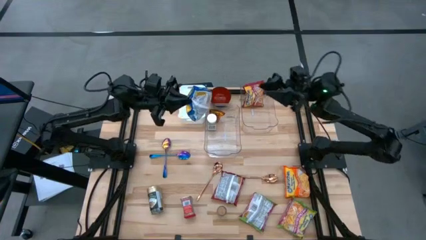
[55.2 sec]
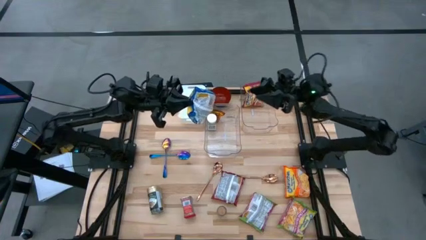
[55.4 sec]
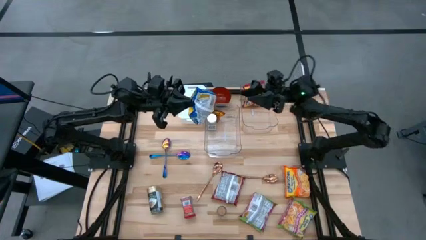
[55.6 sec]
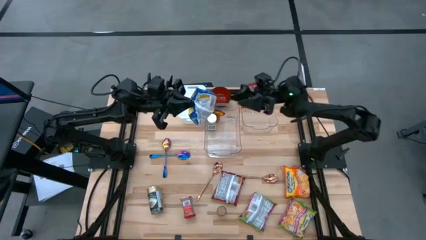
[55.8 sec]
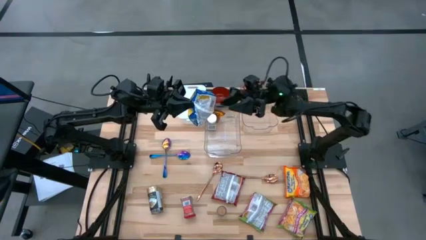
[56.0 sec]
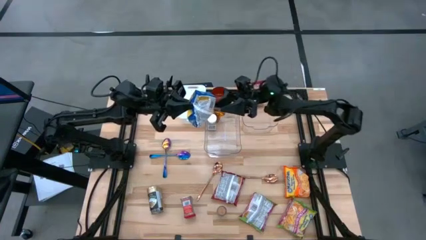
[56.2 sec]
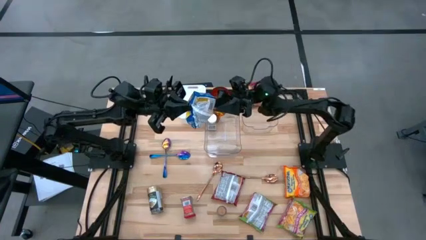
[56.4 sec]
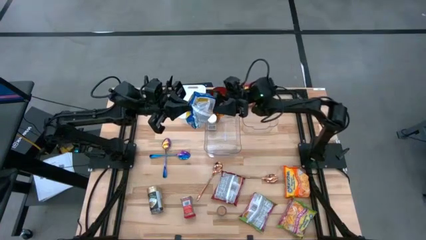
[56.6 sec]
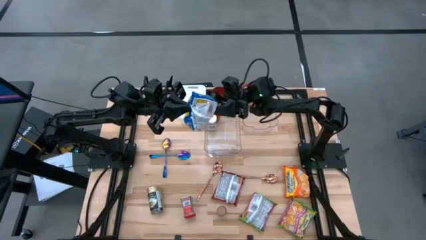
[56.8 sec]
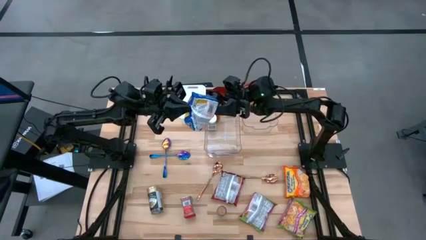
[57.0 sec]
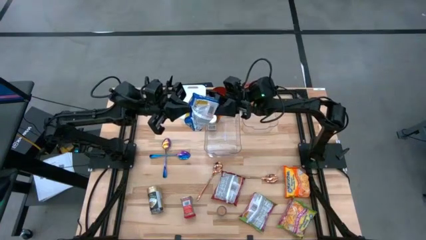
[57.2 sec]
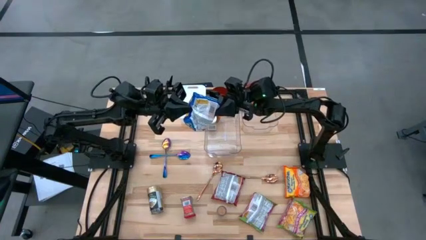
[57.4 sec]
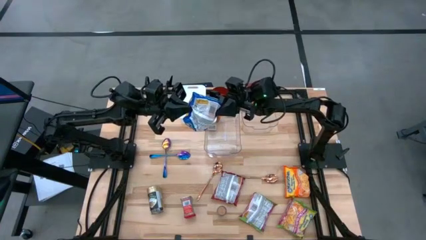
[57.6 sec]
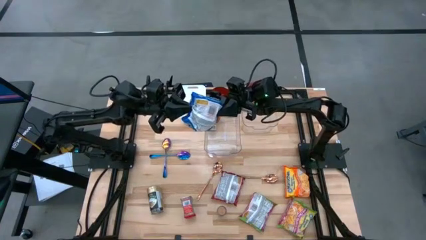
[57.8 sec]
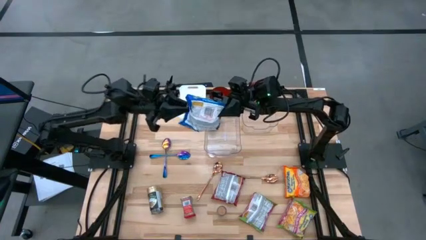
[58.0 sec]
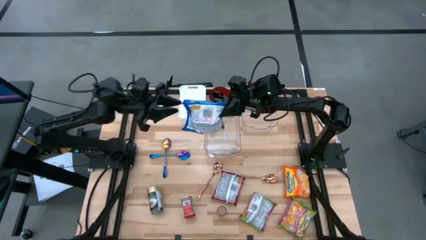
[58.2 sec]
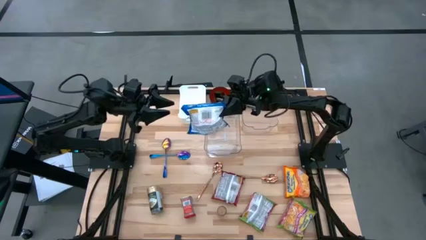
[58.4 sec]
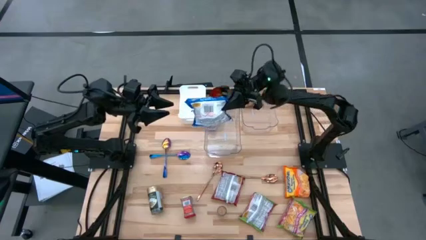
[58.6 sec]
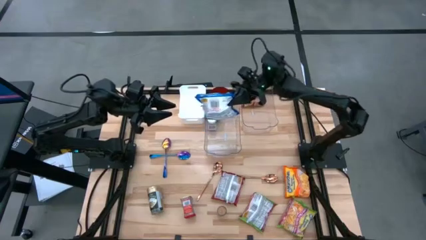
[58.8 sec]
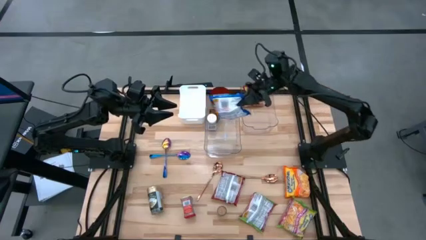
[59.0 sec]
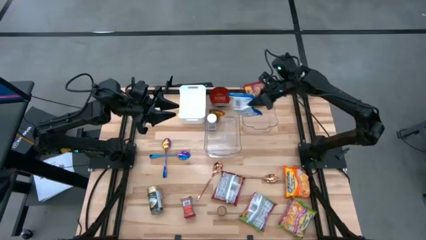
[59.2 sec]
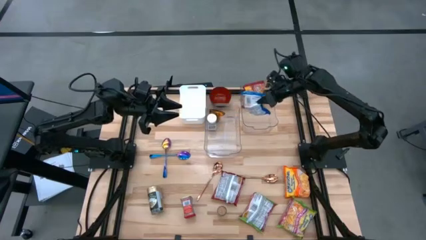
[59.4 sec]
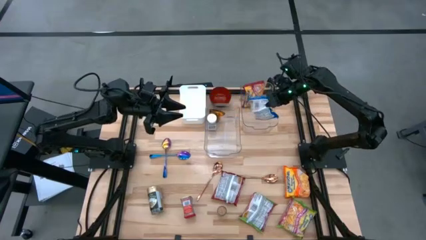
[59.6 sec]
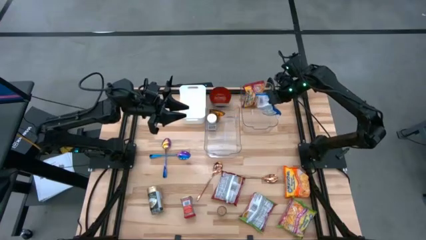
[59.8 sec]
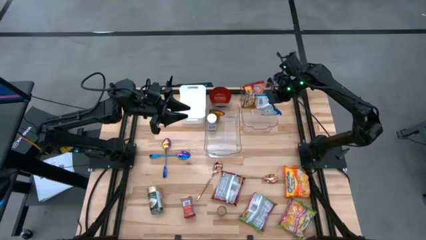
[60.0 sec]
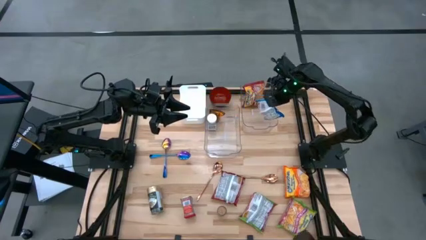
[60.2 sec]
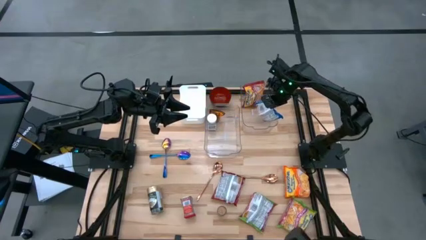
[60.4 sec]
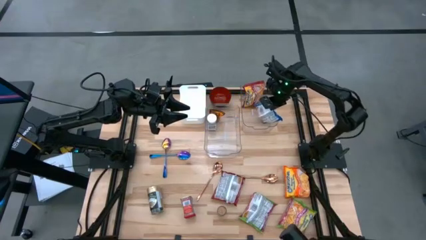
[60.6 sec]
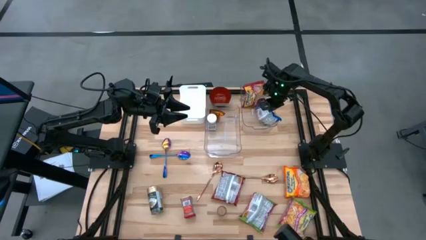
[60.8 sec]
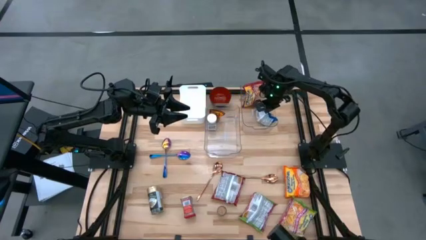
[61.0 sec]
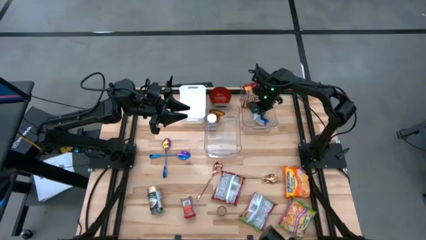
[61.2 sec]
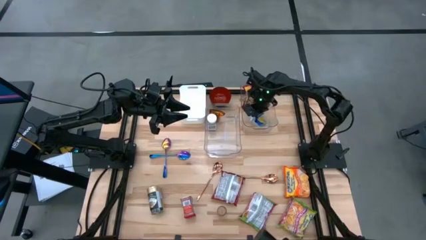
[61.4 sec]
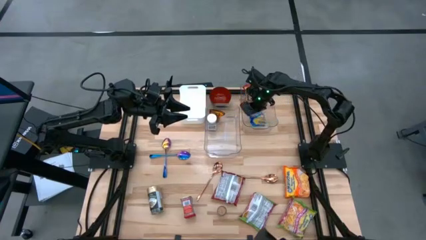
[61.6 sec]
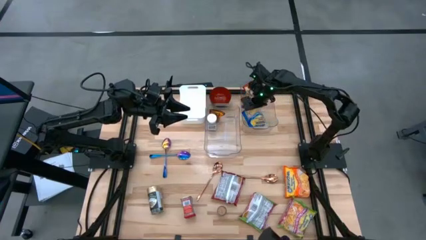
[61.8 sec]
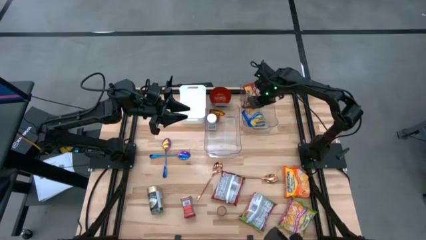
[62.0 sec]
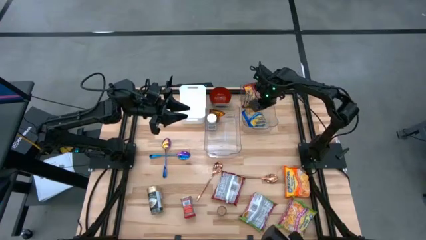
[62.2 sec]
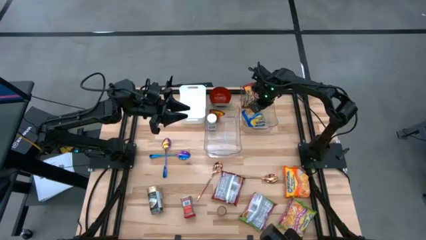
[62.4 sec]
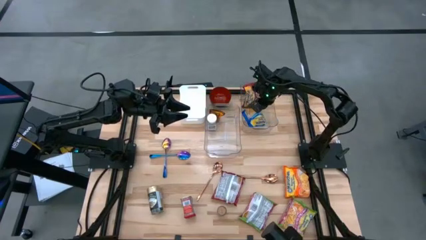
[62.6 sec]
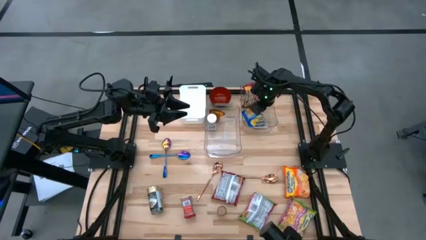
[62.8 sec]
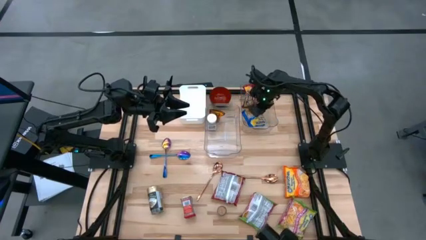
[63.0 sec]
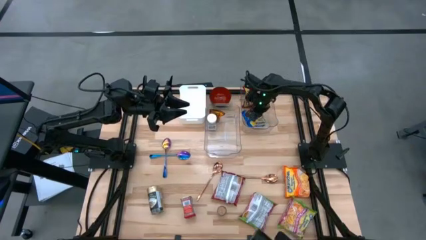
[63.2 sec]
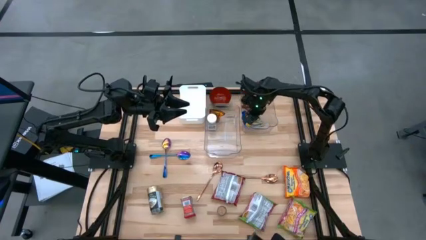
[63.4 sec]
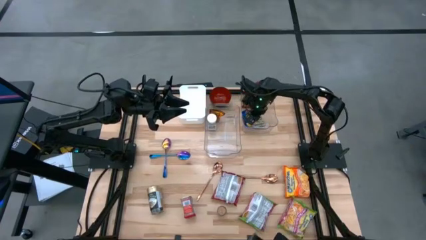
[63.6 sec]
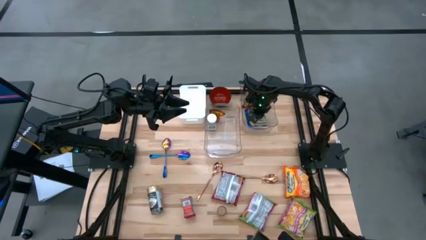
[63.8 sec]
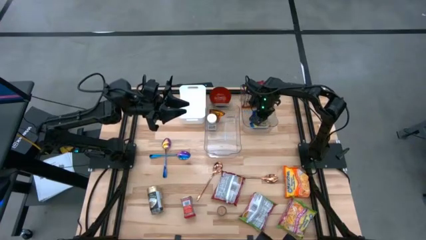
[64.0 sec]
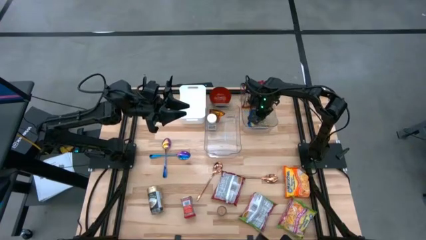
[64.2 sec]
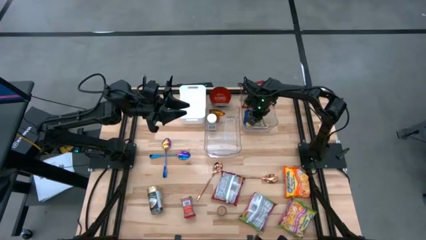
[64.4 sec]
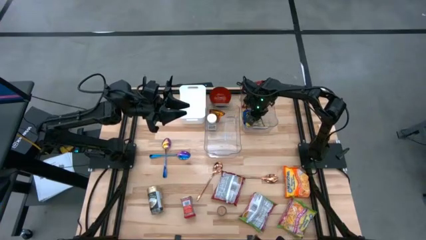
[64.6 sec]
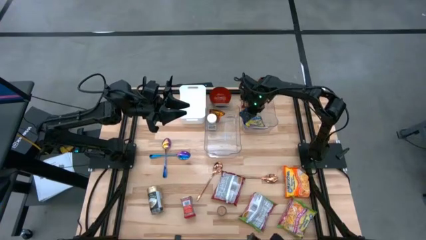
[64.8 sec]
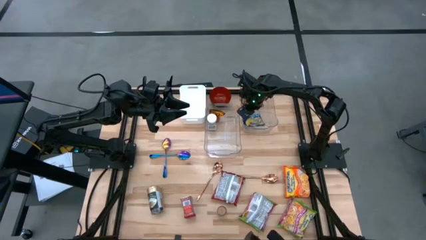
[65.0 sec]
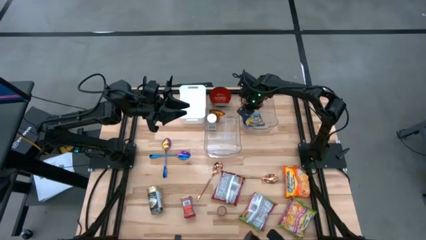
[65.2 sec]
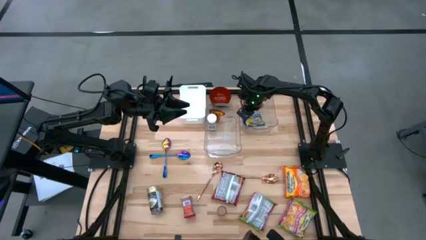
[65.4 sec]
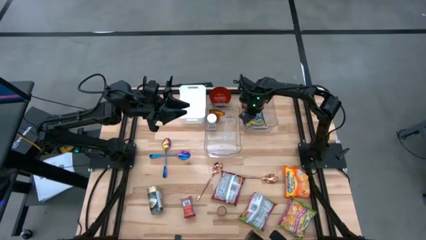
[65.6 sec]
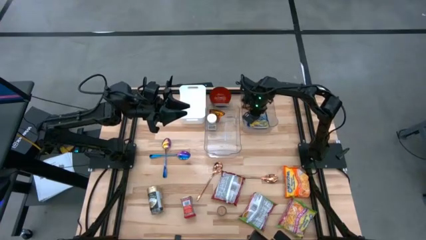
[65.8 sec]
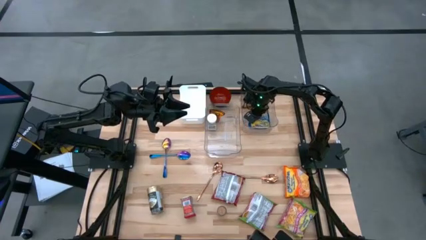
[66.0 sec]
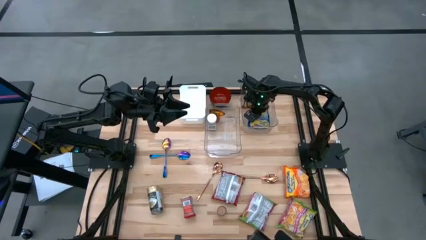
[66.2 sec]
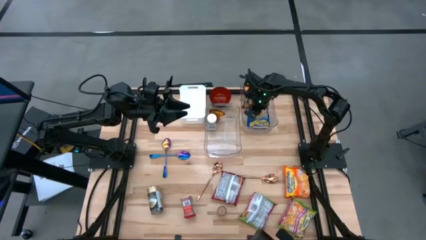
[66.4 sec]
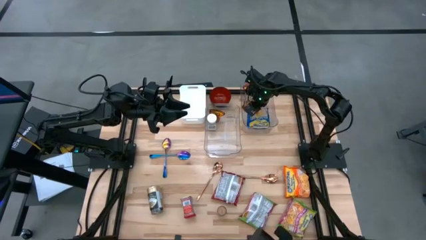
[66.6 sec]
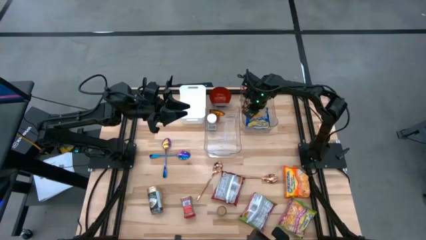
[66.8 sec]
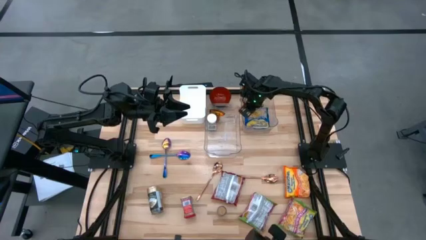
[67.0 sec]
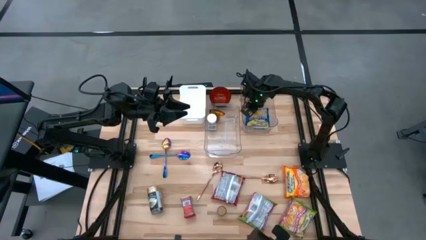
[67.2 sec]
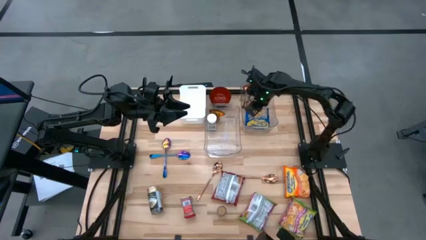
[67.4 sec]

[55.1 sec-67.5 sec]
Task: Pick & Place Food Item
Put the blue noodle pack into the right transparent bin
